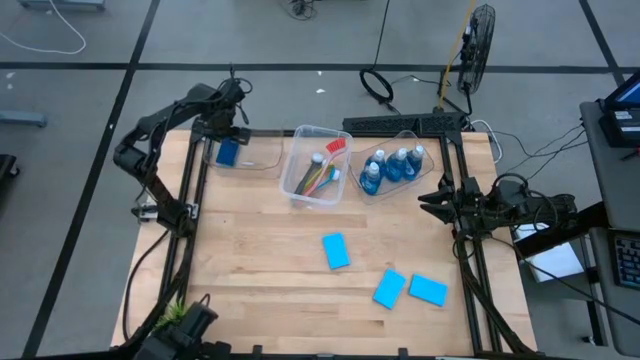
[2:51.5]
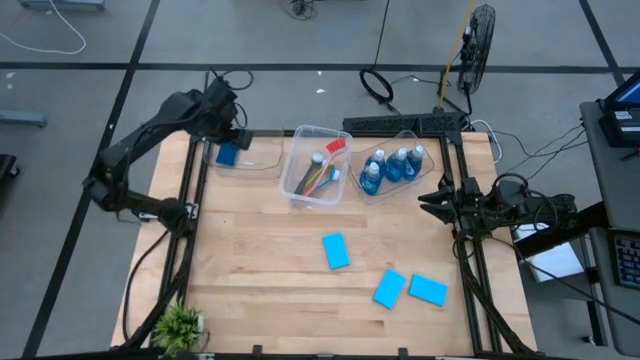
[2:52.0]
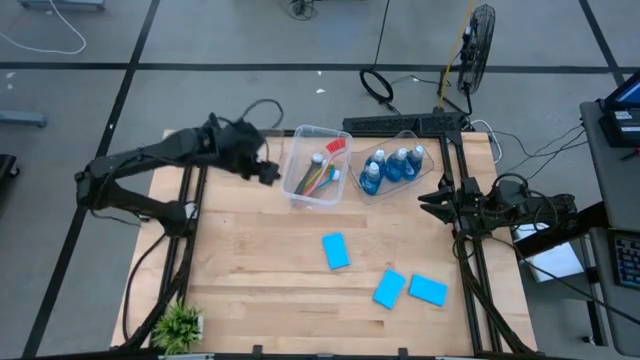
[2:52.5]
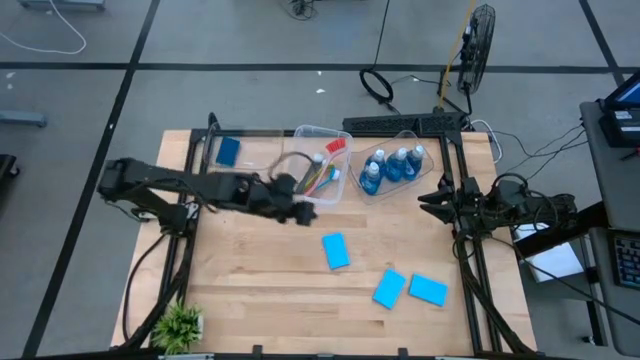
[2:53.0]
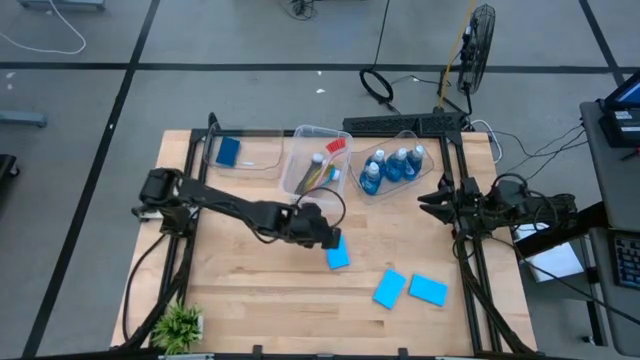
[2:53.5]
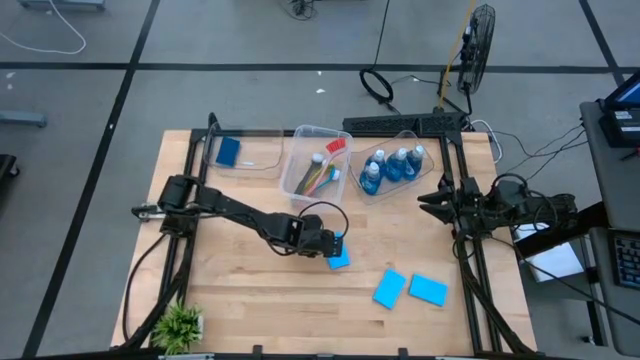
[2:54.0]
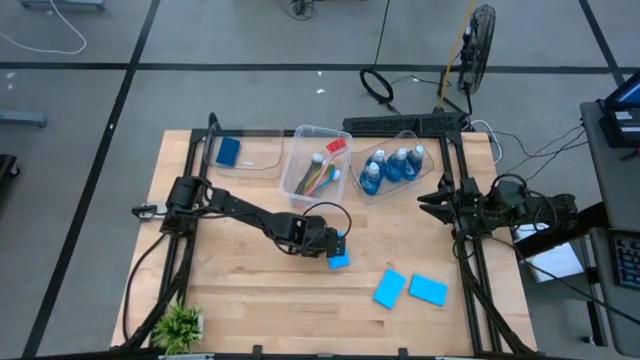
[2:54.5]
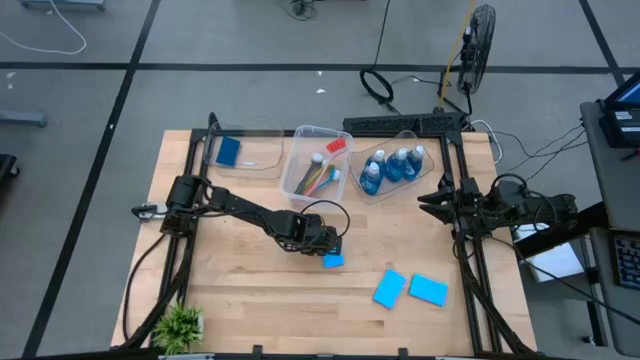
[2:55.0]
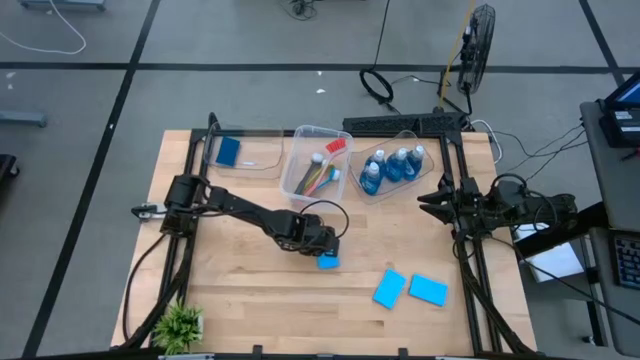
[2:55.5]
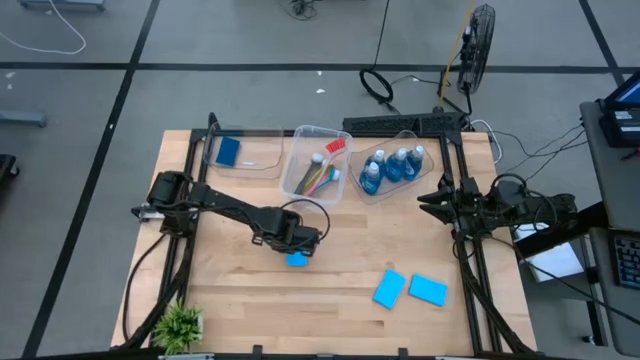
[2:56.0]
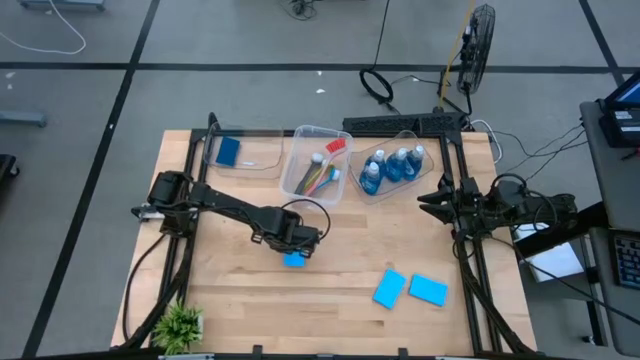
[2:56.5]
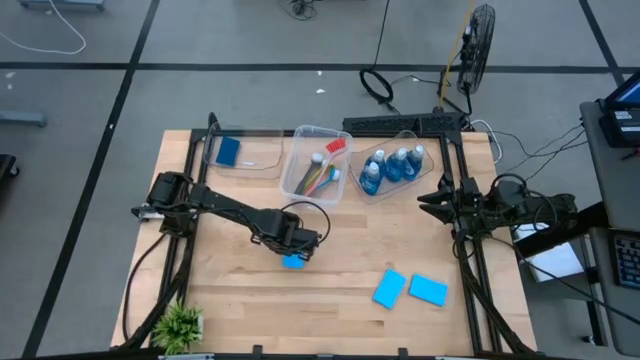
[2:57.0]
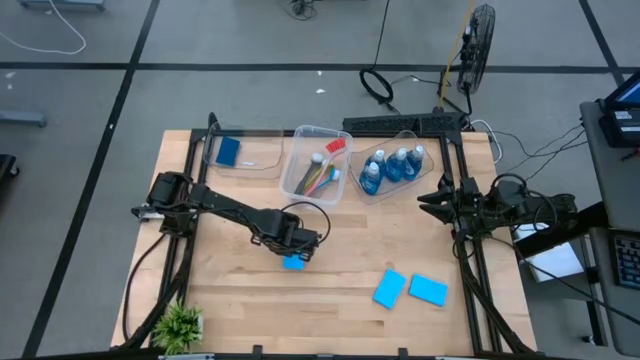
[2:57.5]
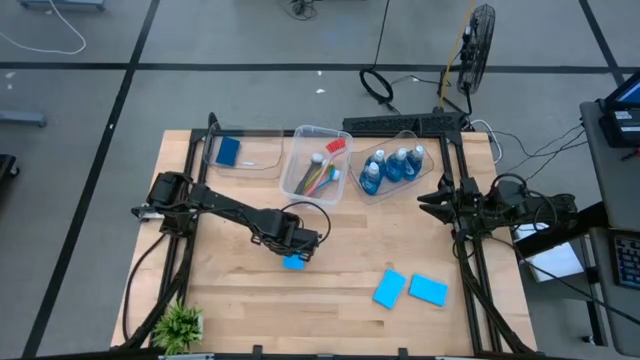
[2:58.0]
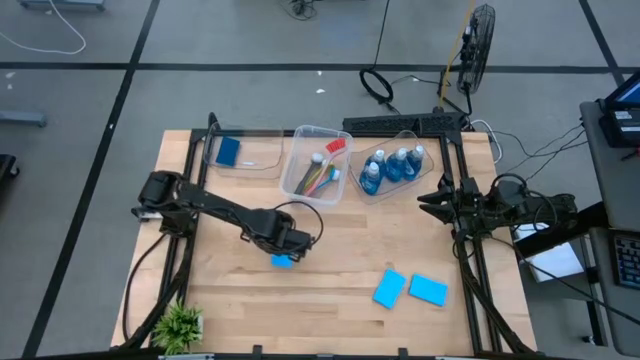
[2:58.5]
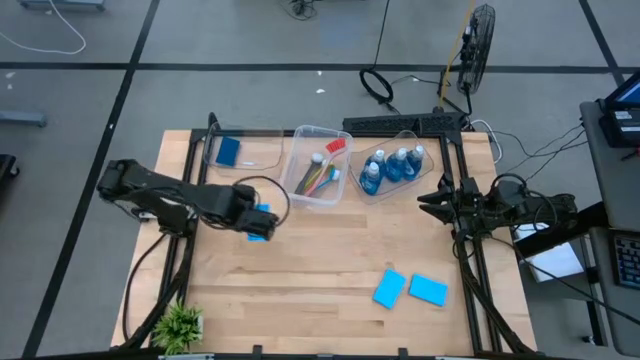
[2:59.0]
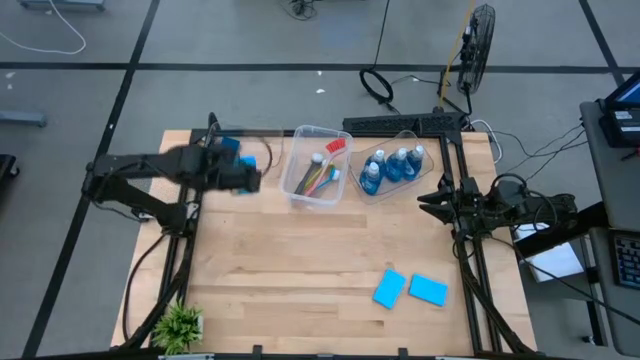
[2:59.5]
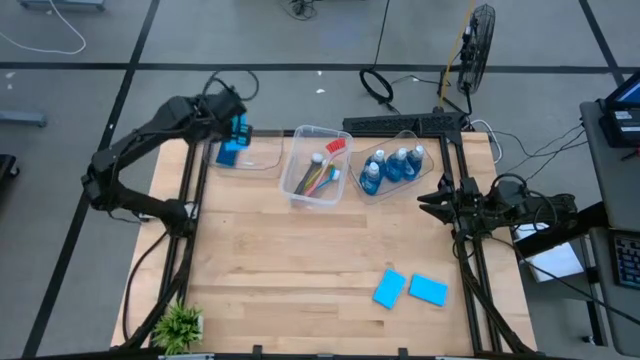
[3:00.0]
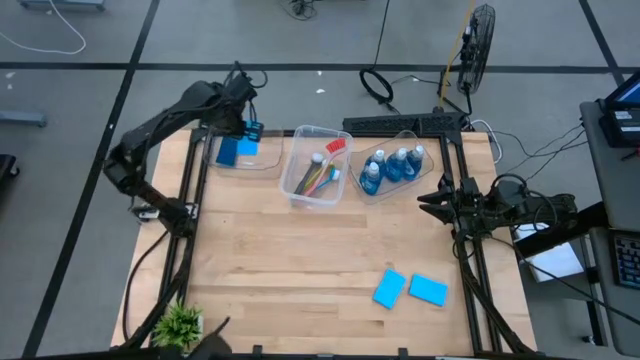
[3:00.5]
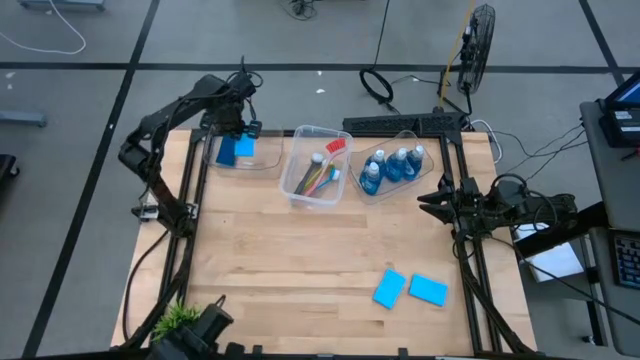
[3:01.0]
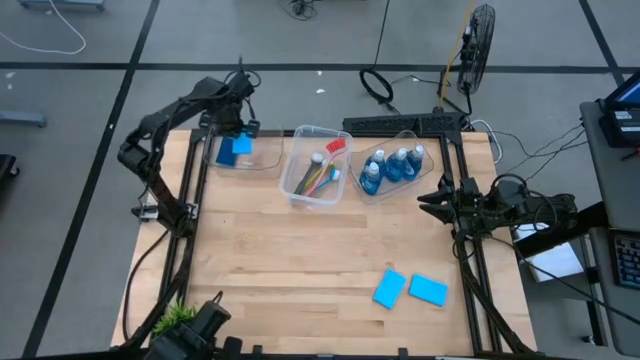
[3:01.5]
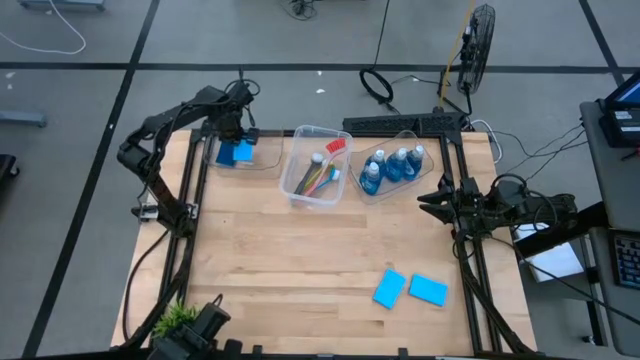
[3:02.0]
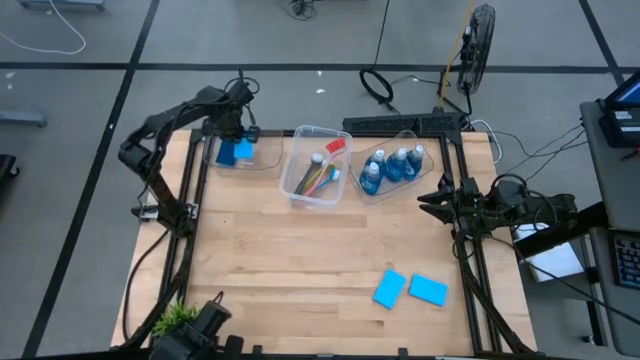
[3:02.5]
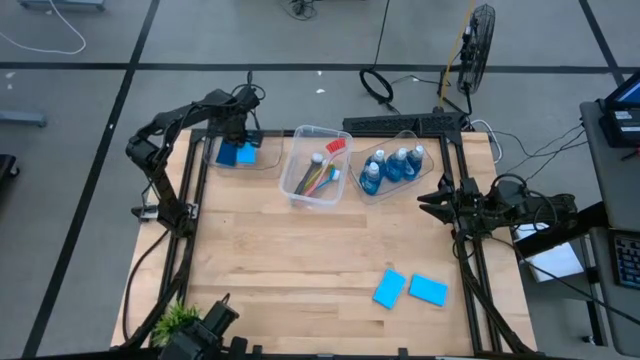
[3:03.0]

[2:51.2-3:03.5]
Task: Pick & Place Kitchen Sink Supplies
Put the blue sponge into the left transparent bin

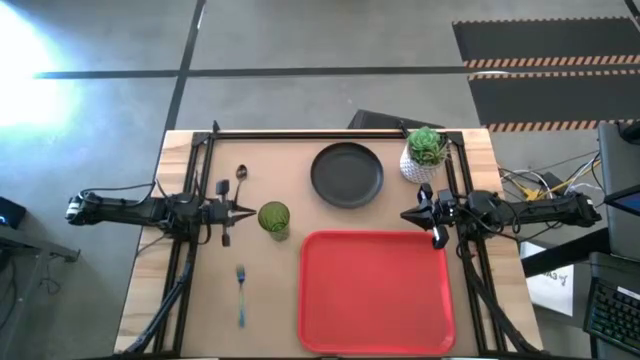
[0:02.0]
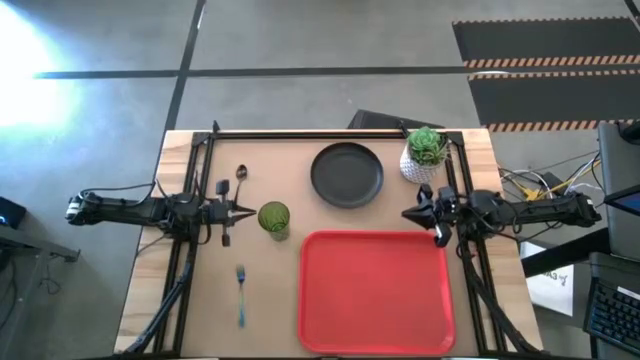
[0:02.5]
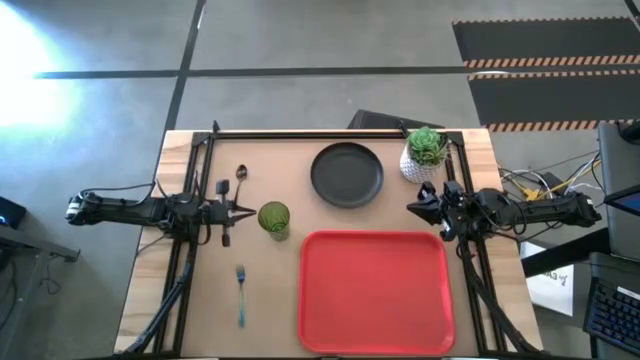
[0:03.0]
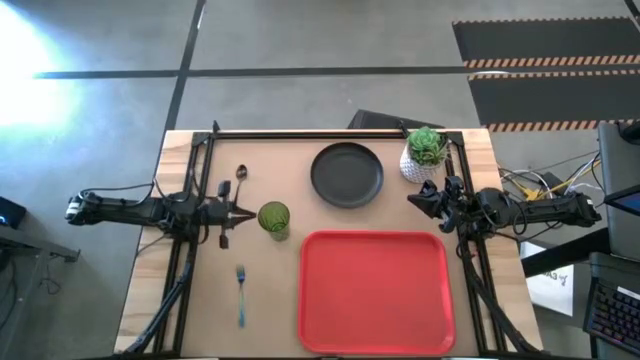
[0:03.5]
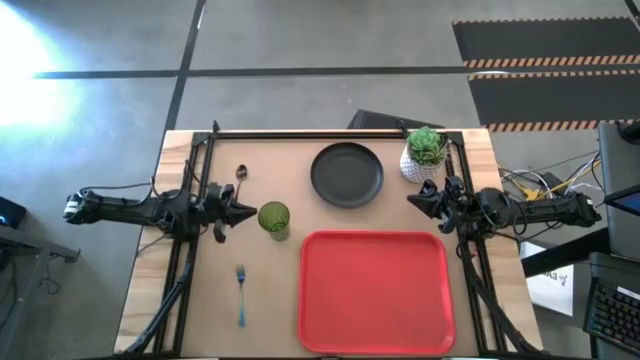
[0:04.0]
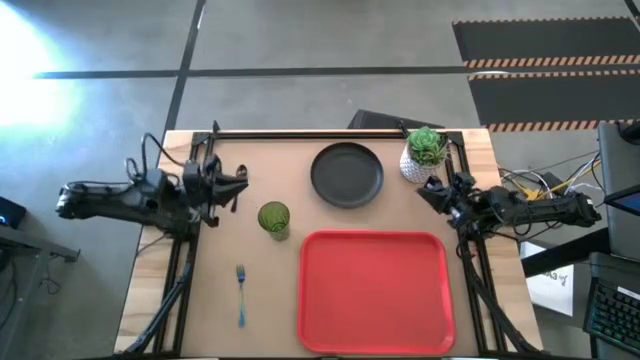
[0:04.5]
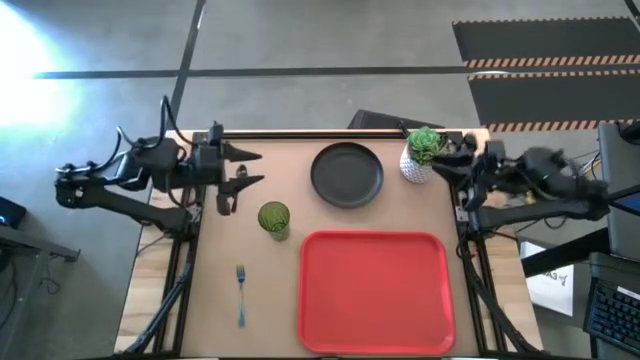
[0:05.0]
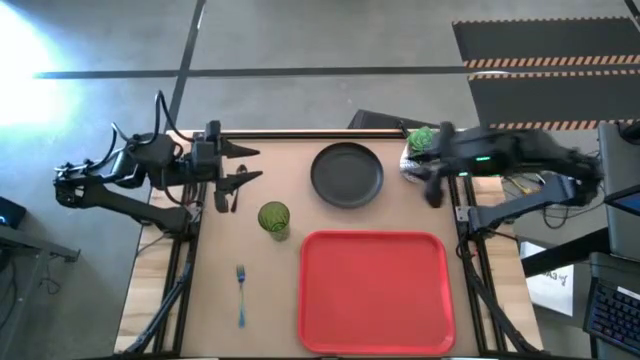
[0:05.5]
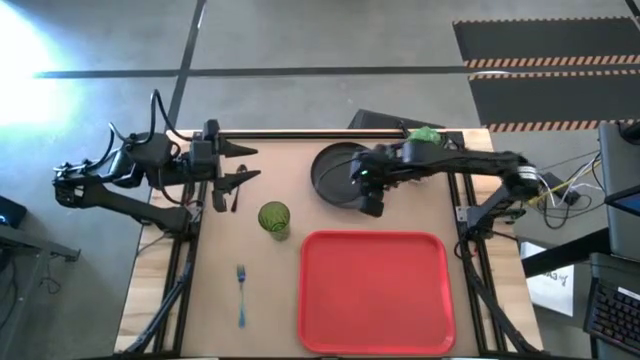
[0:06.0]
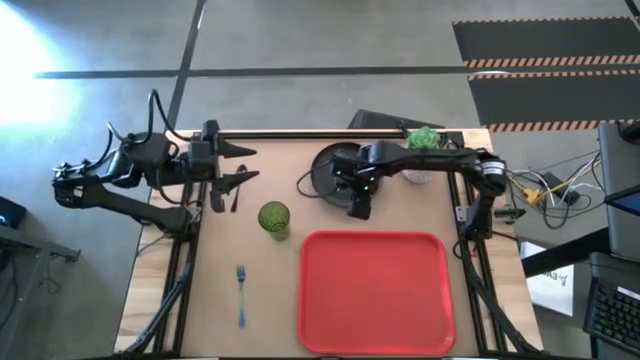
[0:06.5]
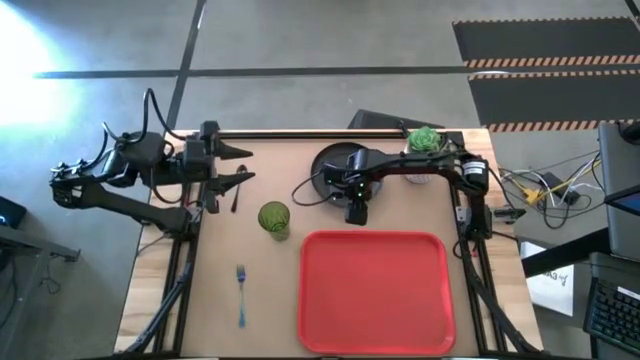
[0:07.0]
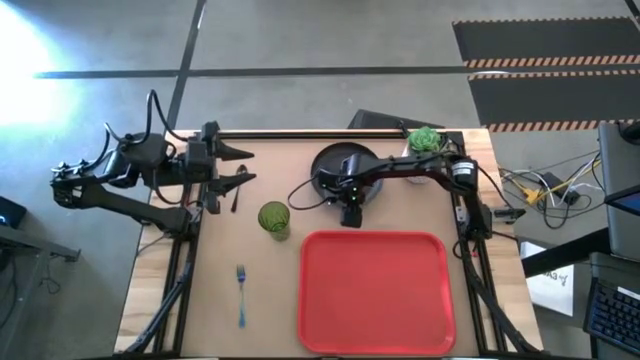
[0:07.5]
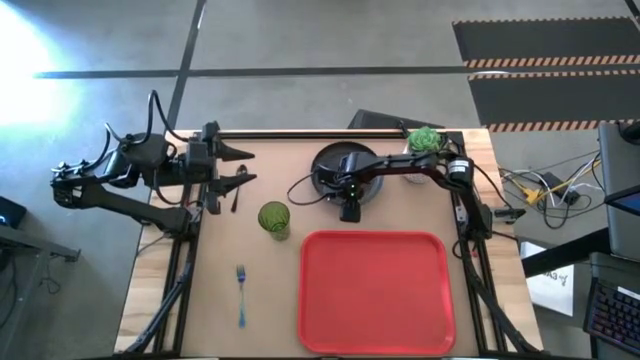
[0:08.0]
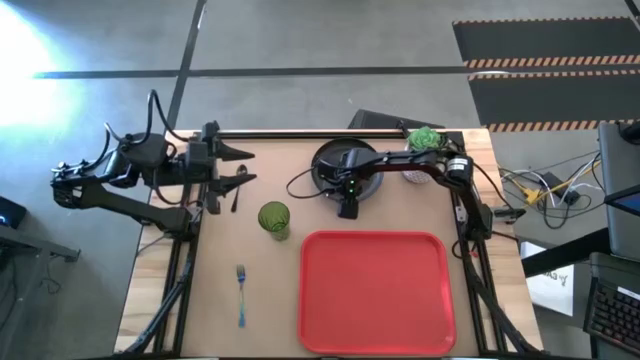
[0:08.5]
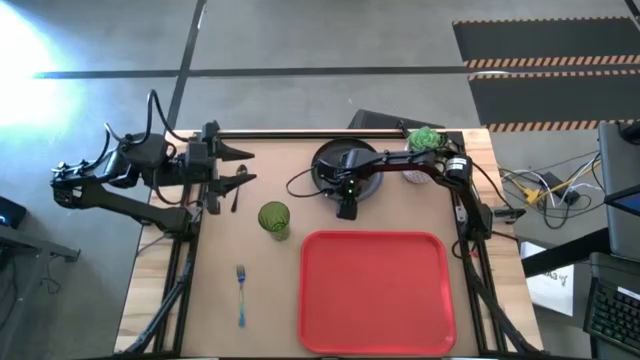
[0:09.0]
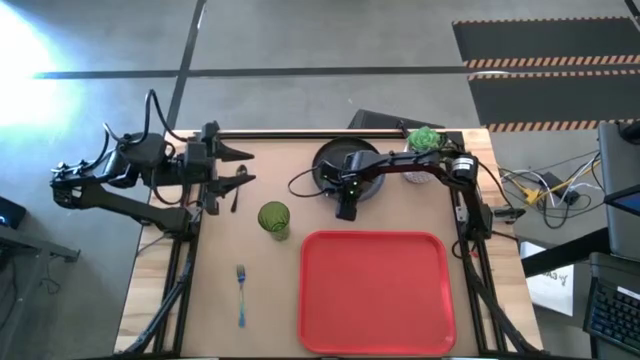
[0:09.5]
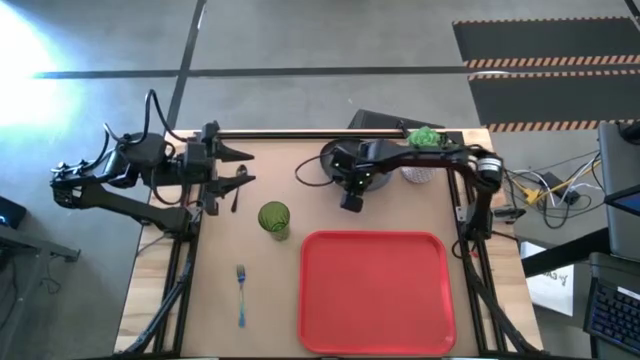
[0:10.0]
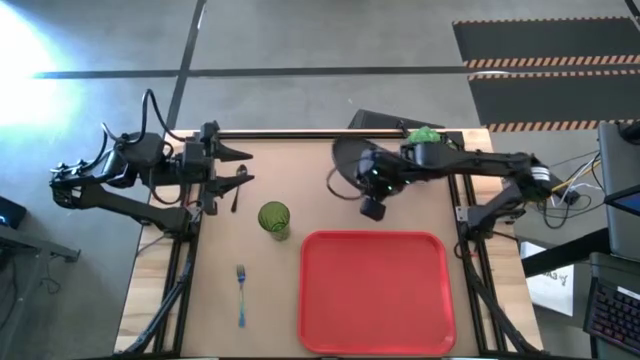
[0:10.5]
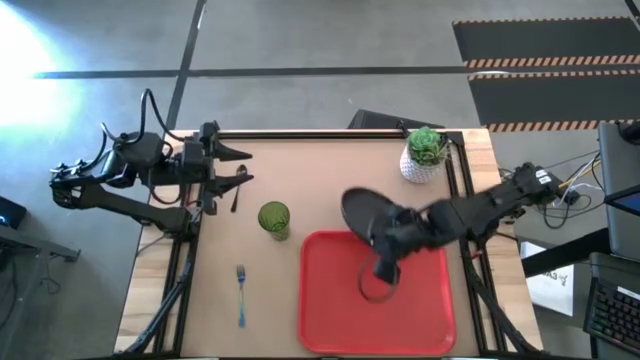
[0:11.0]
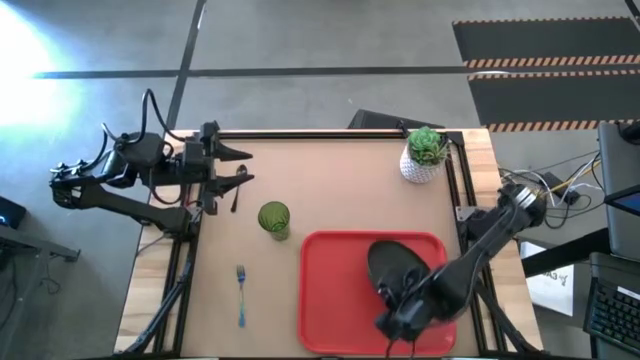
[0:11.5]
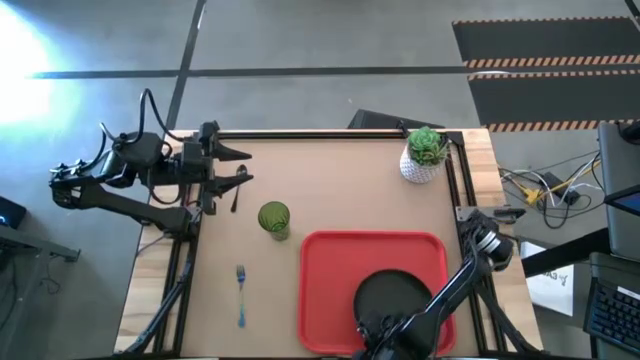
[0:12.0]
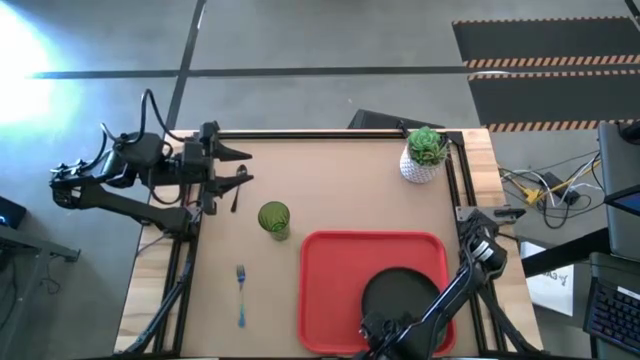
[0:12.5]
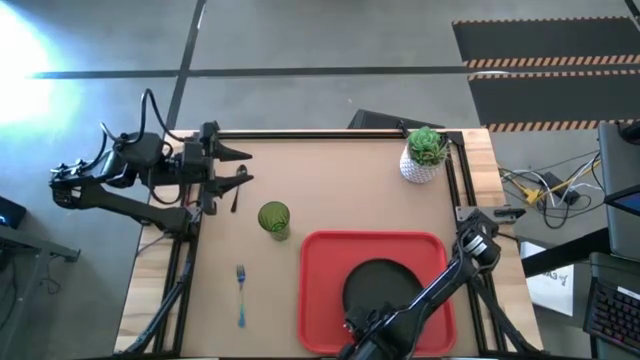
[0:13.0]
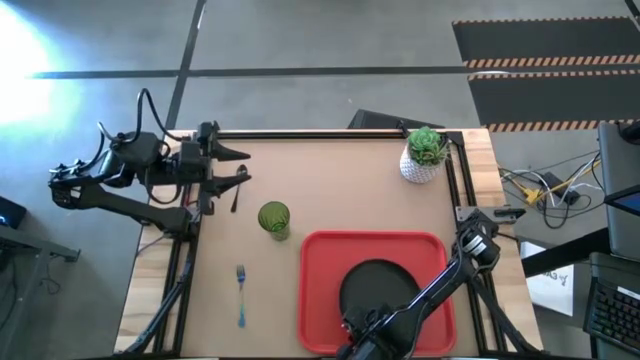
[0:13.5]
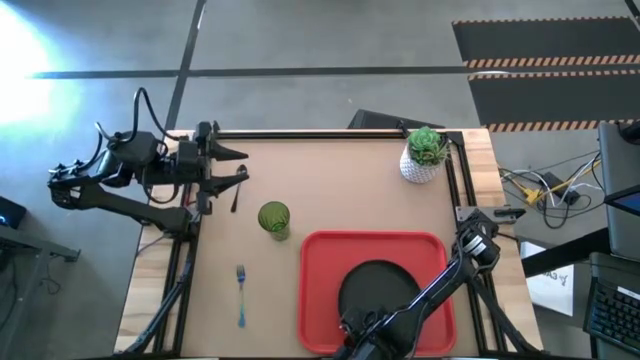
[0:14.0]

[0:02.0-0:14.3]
Task: Pick and place plate/cup/fork/spoon on tray
Put the black plate on the red serving tray
